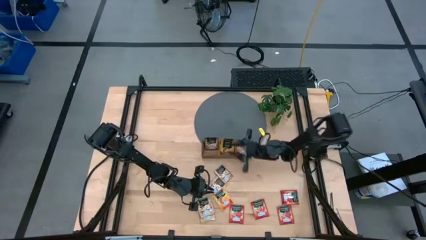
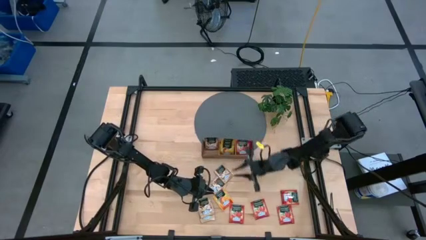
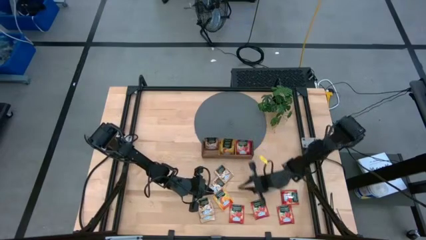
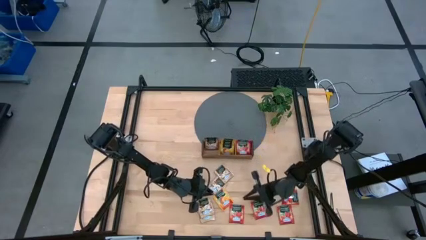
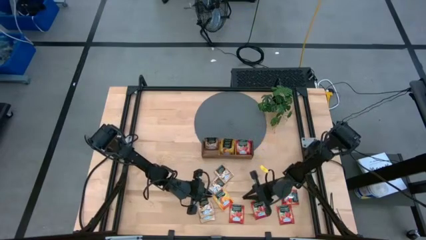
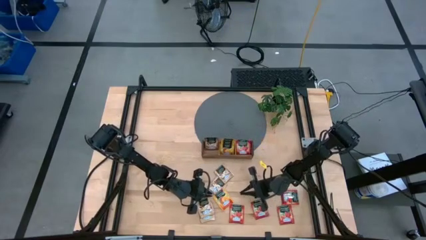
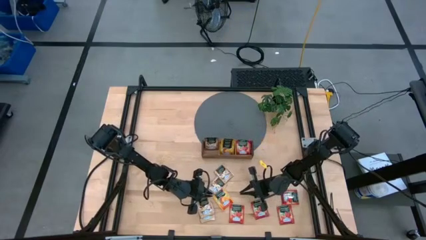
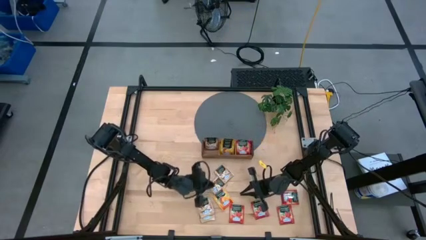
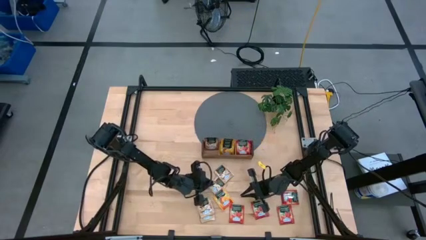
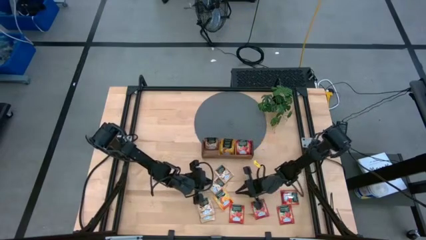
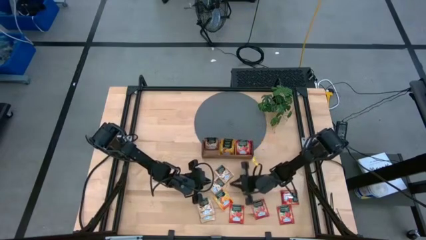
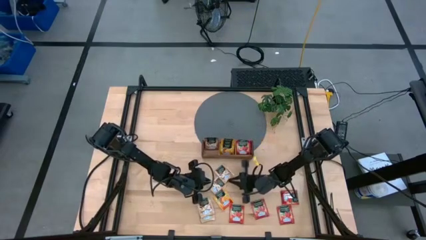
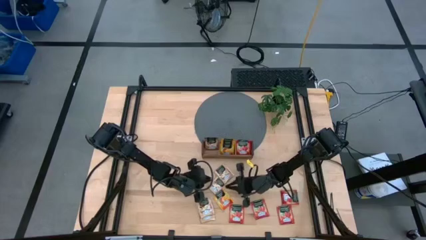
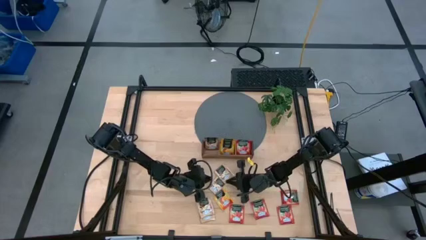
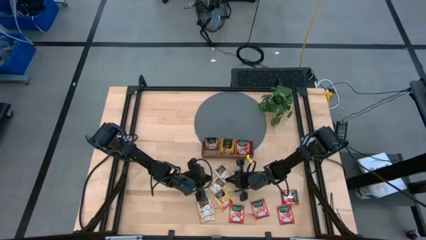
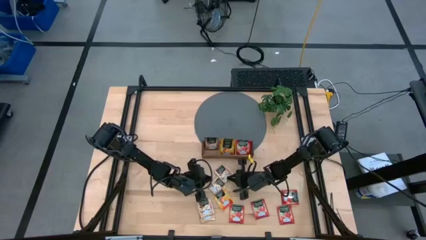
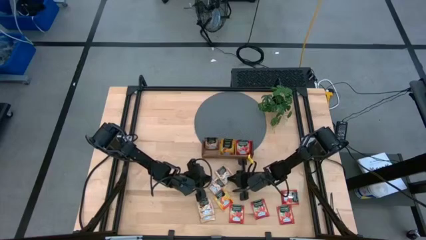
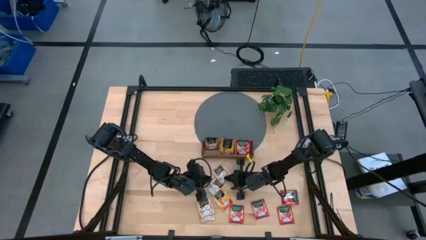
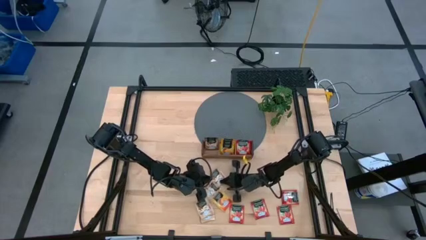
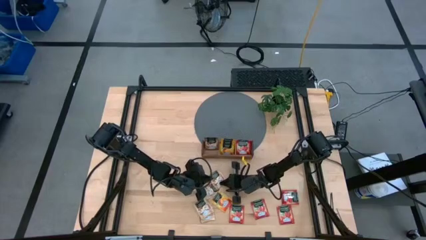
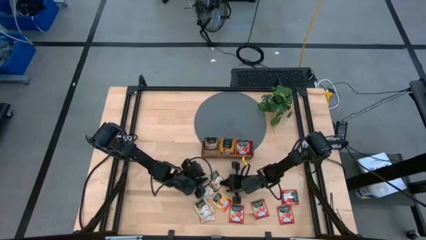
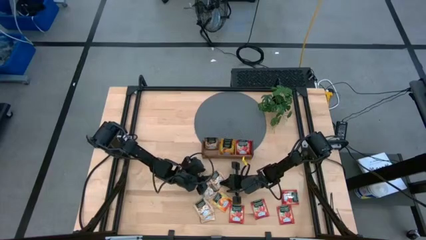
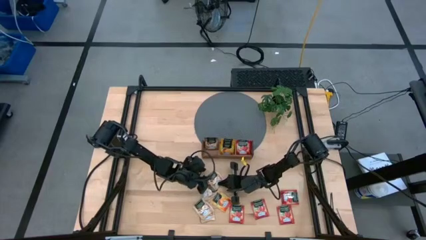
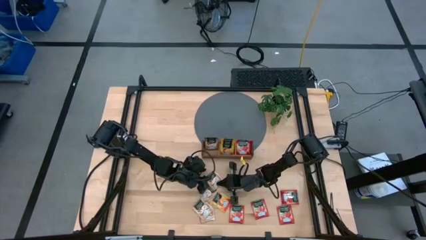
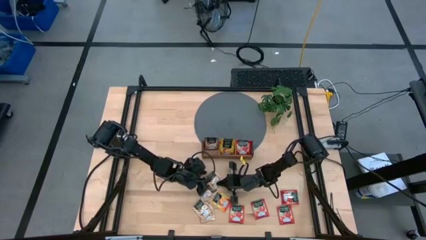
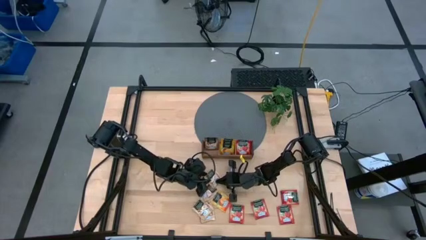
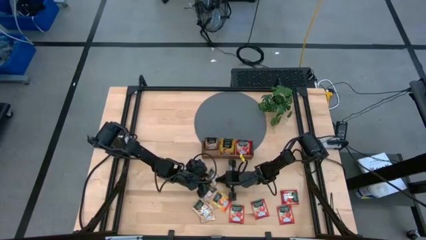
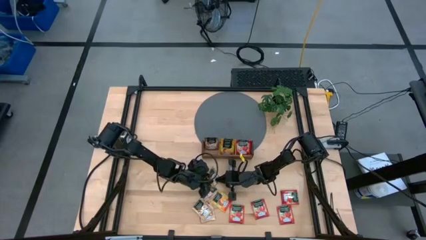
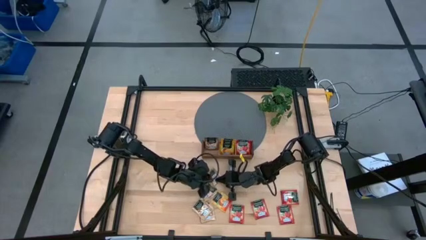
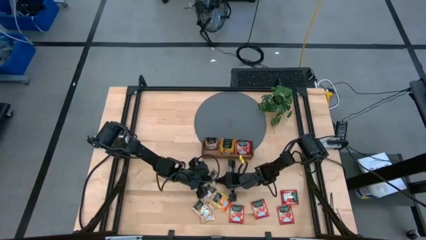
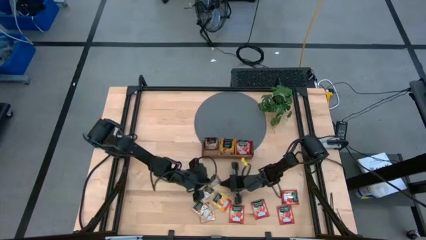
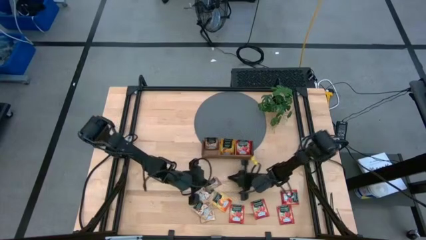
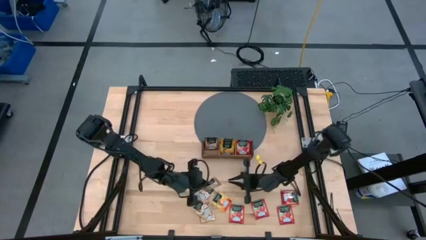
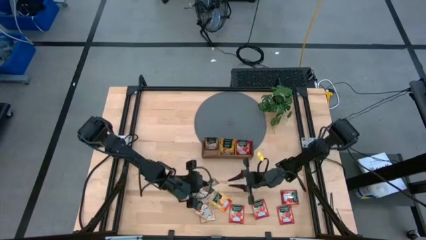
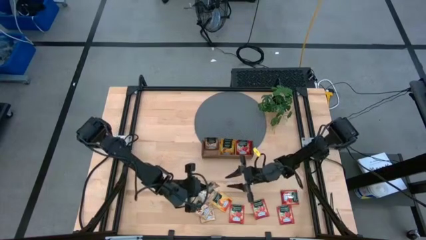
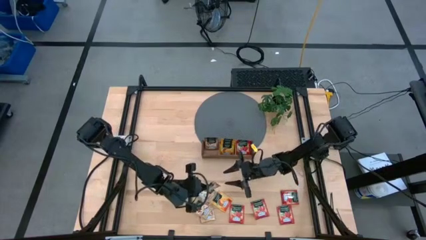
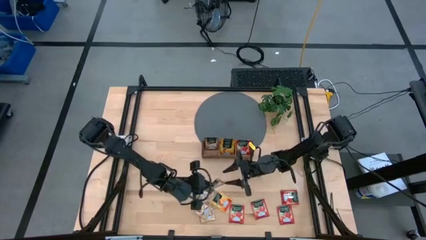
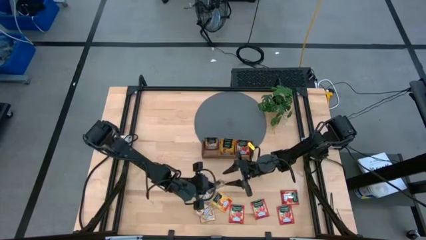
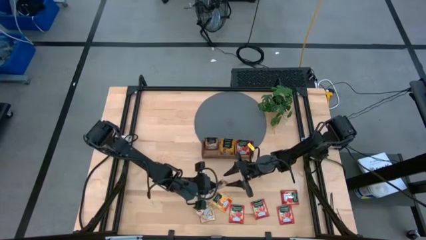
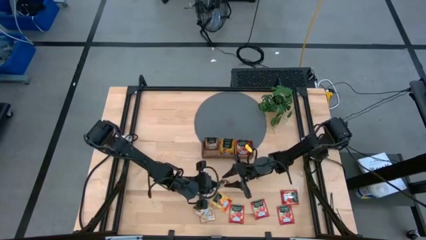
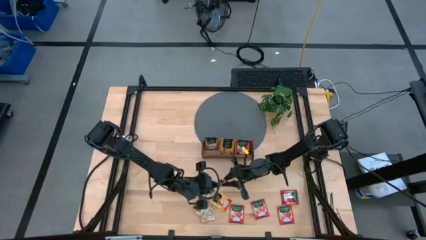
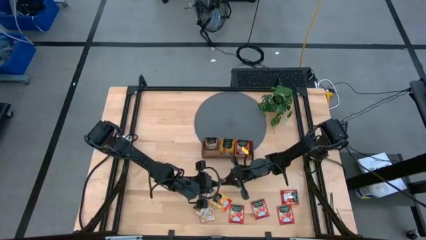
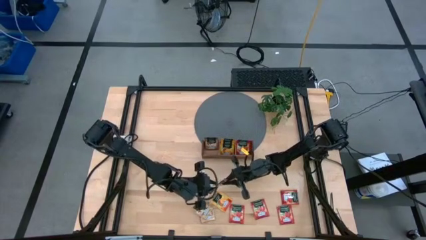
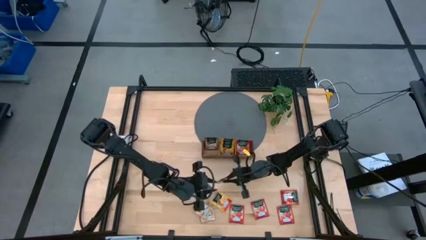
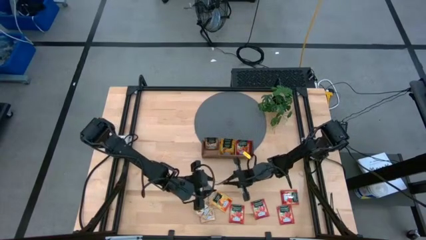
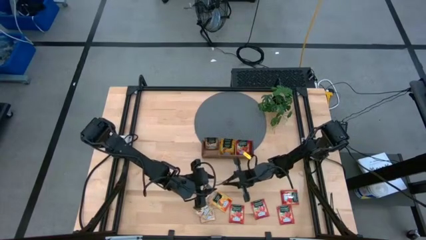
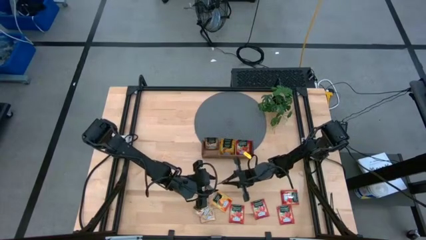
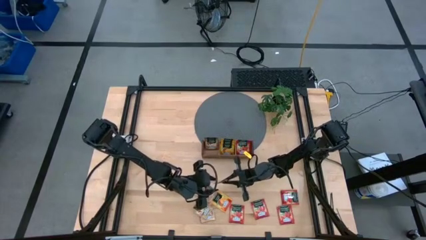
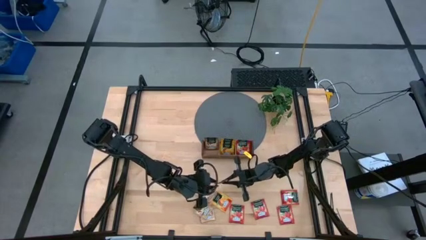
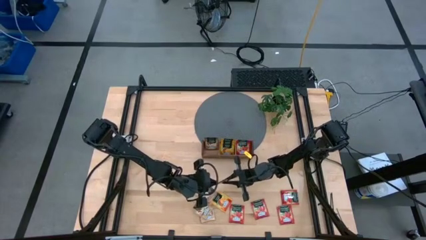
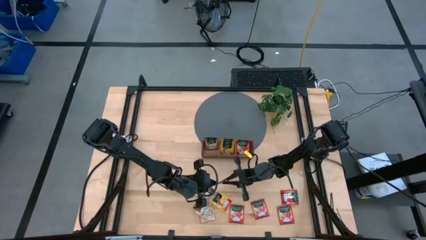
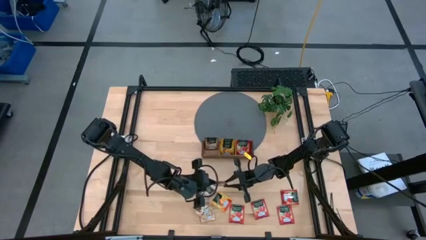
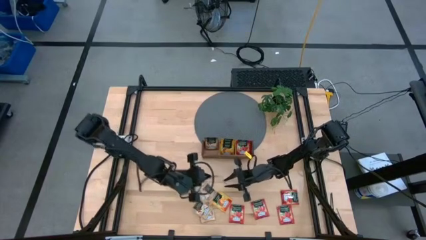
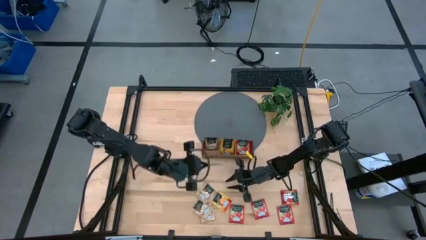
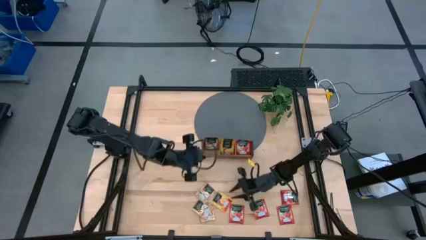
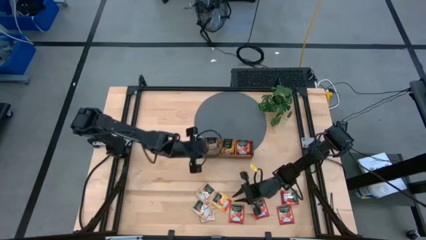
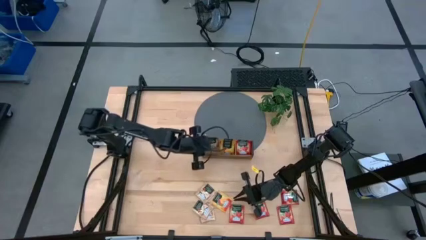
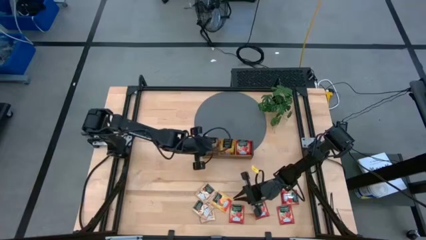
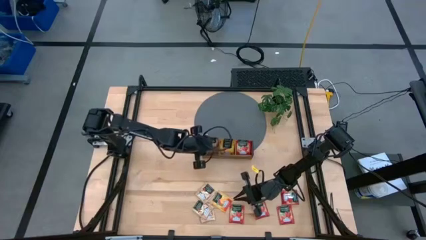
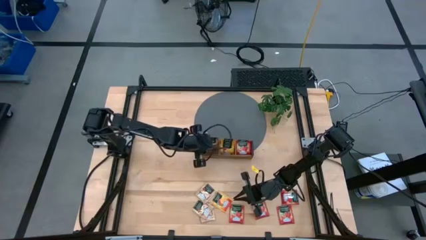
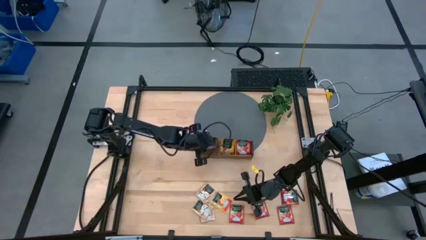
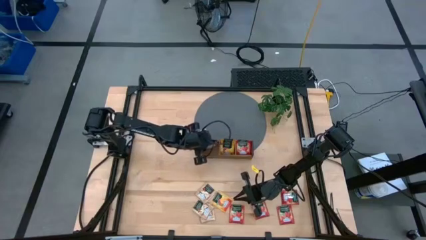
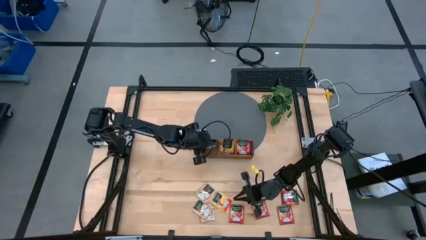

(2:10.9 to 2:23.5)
Task: Pick & Place Tea
Put the brown tea bag into the left wooden organizer
